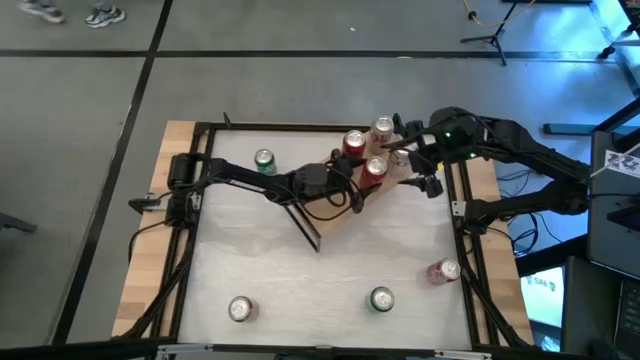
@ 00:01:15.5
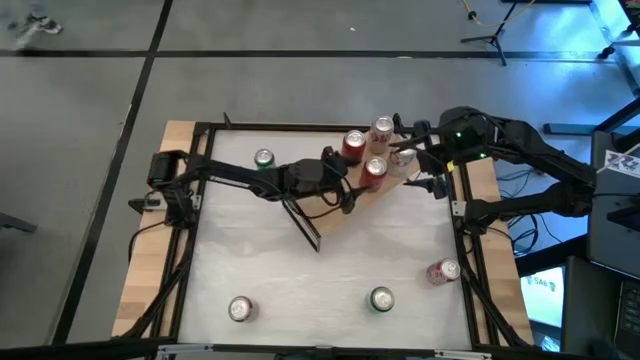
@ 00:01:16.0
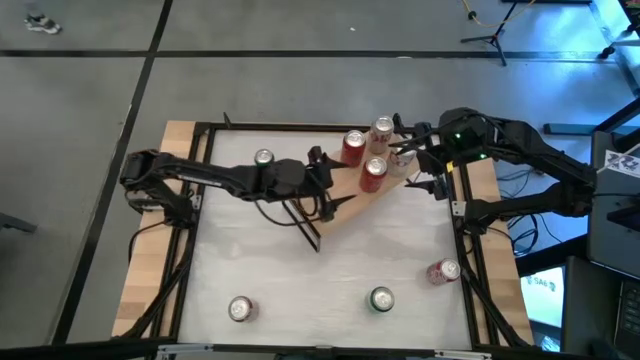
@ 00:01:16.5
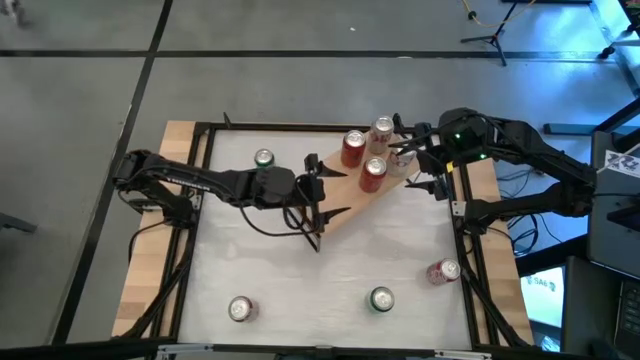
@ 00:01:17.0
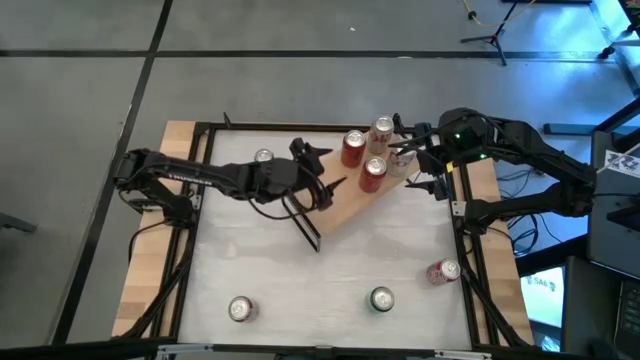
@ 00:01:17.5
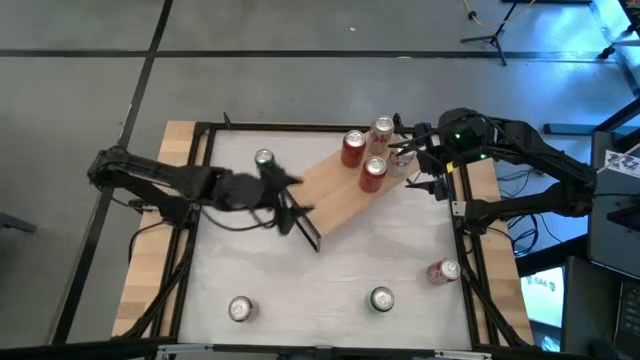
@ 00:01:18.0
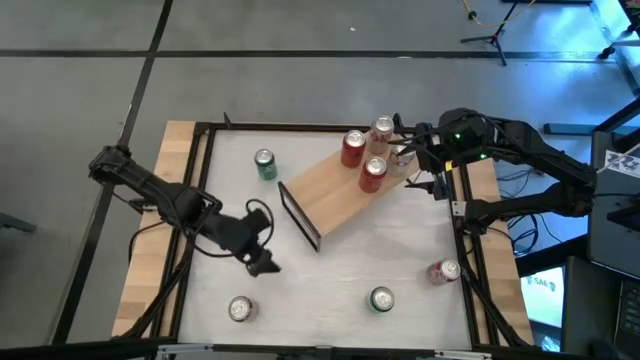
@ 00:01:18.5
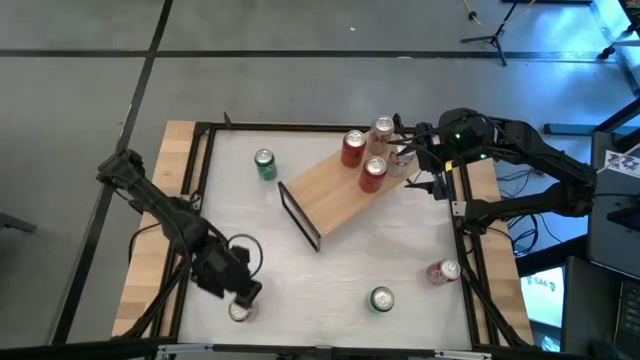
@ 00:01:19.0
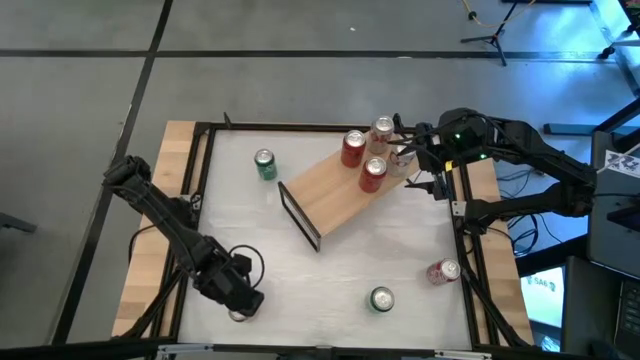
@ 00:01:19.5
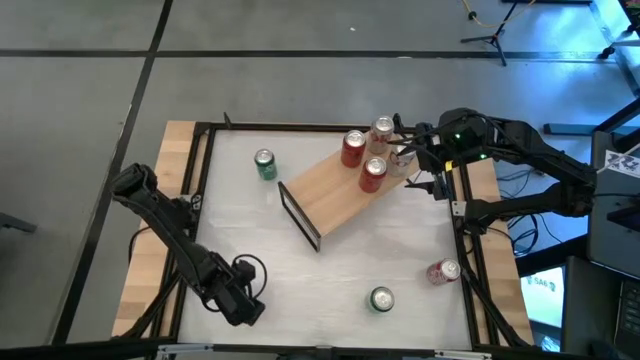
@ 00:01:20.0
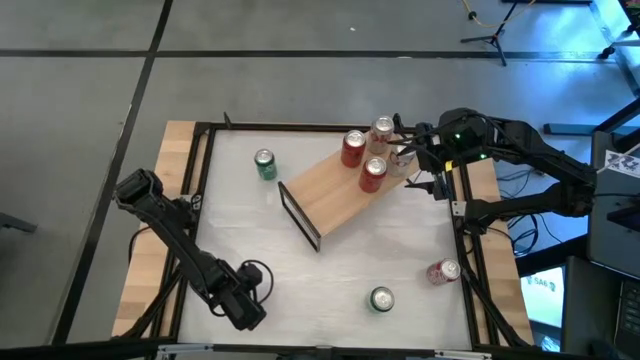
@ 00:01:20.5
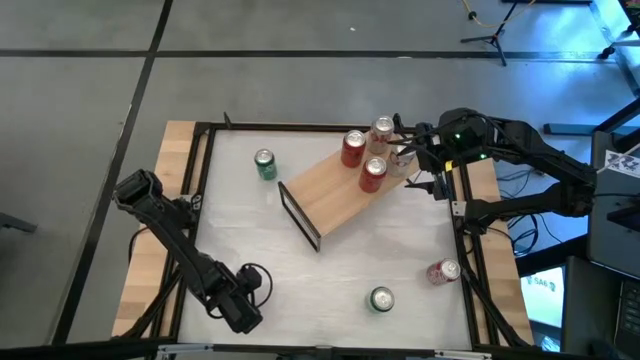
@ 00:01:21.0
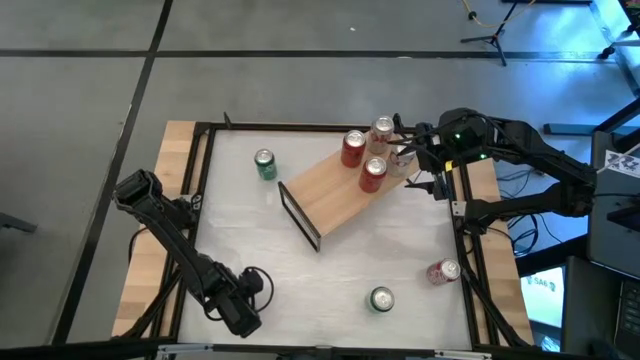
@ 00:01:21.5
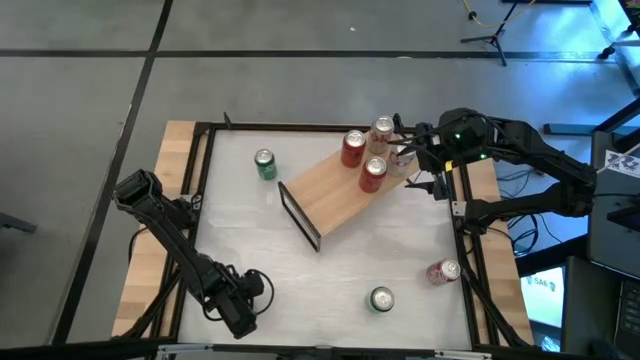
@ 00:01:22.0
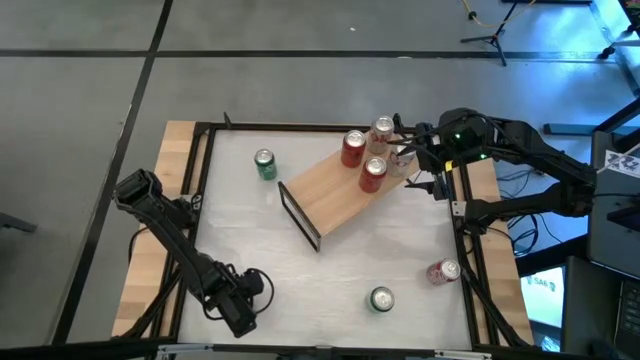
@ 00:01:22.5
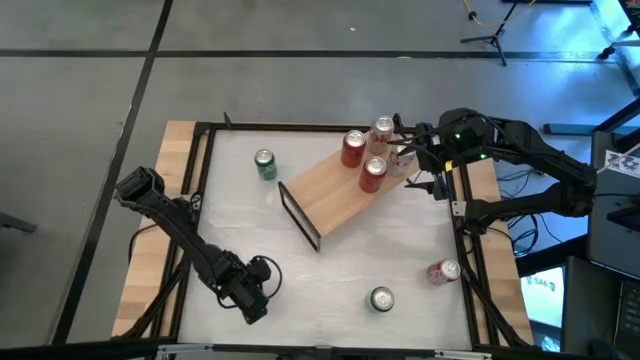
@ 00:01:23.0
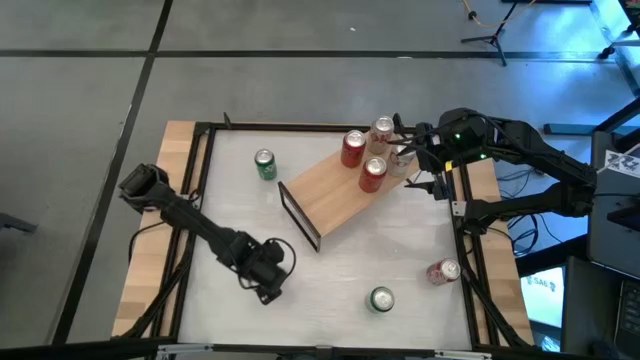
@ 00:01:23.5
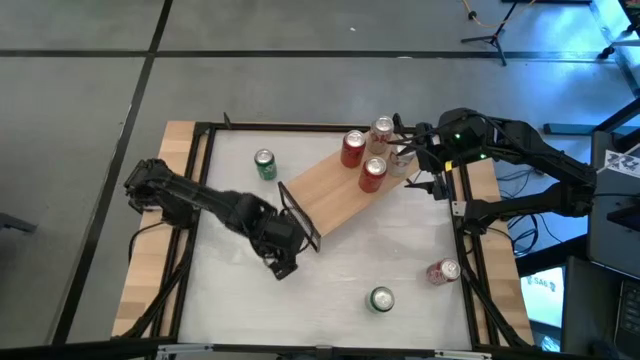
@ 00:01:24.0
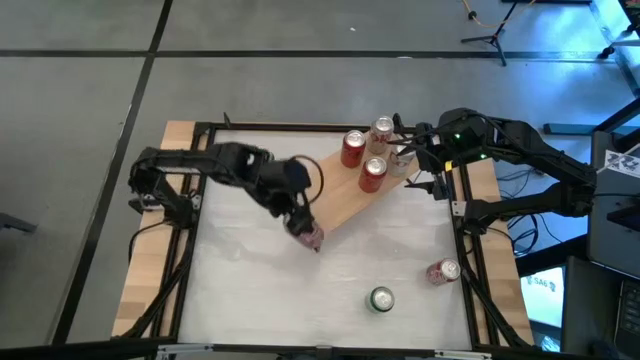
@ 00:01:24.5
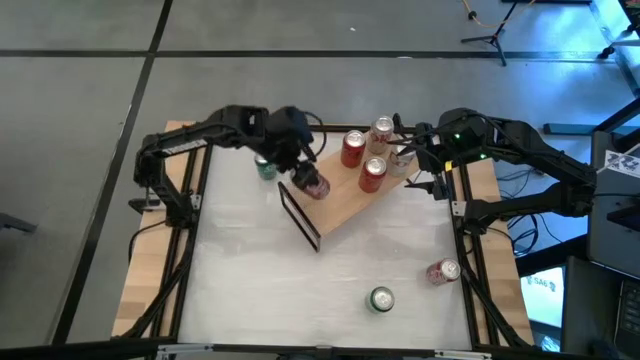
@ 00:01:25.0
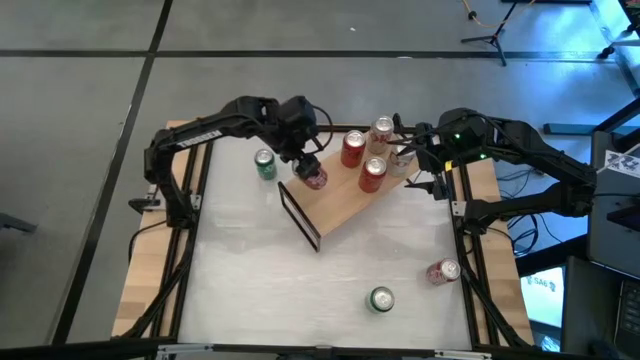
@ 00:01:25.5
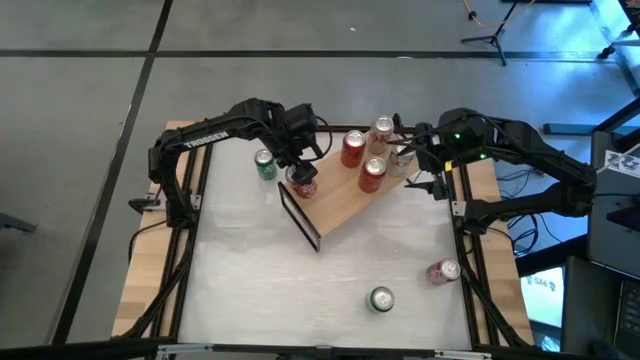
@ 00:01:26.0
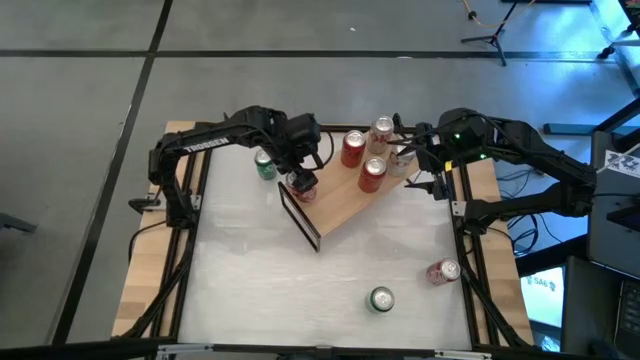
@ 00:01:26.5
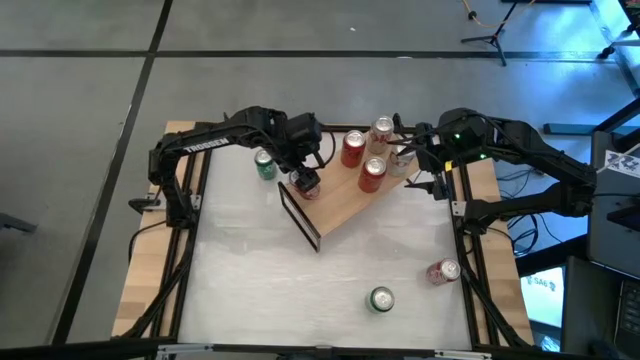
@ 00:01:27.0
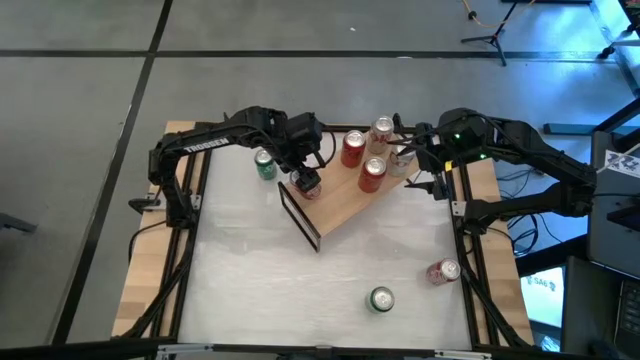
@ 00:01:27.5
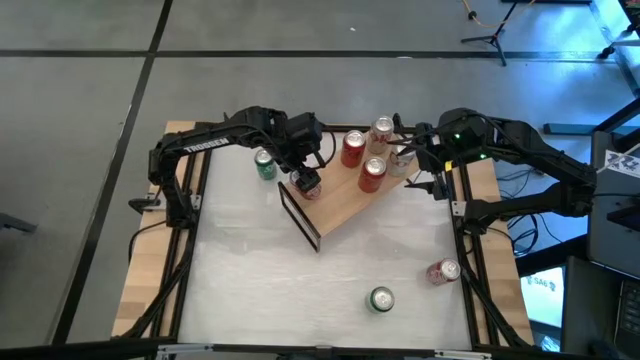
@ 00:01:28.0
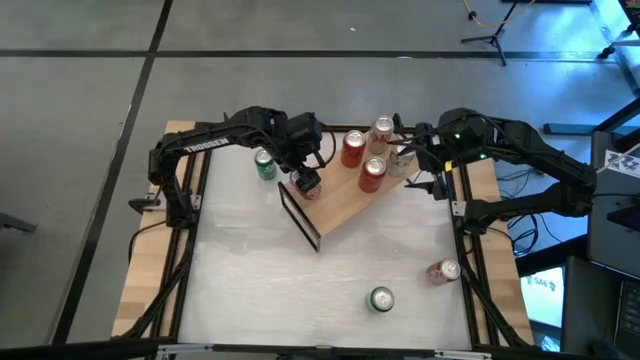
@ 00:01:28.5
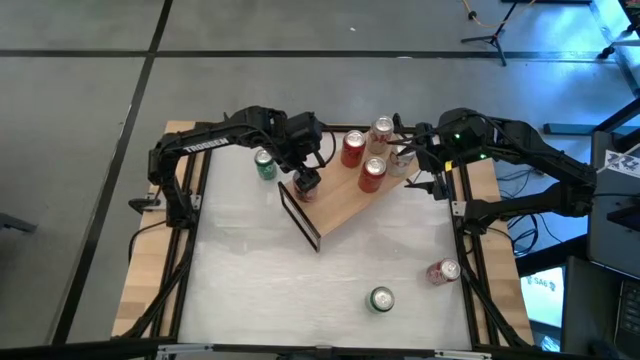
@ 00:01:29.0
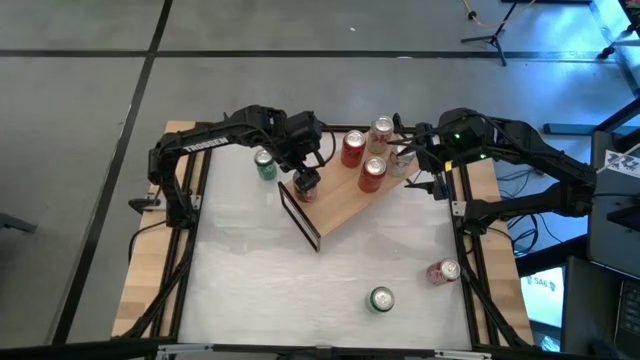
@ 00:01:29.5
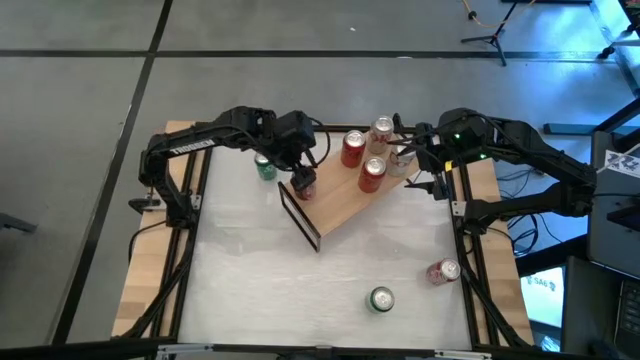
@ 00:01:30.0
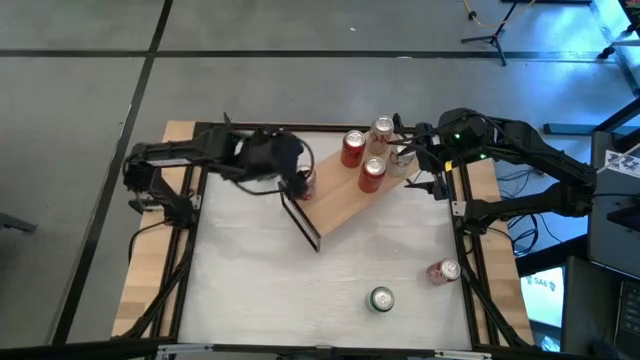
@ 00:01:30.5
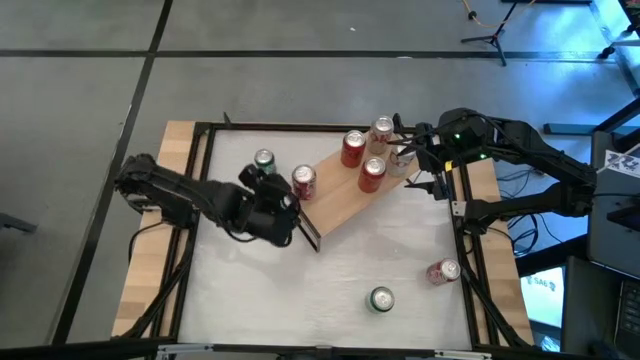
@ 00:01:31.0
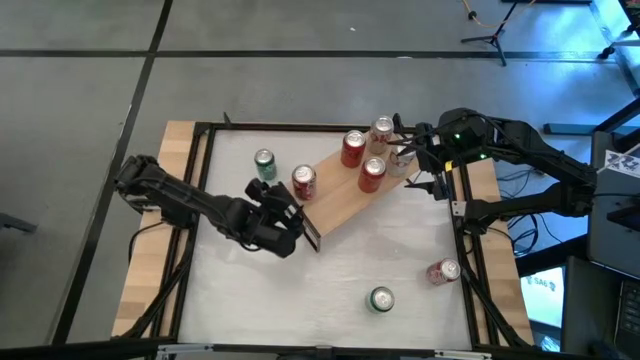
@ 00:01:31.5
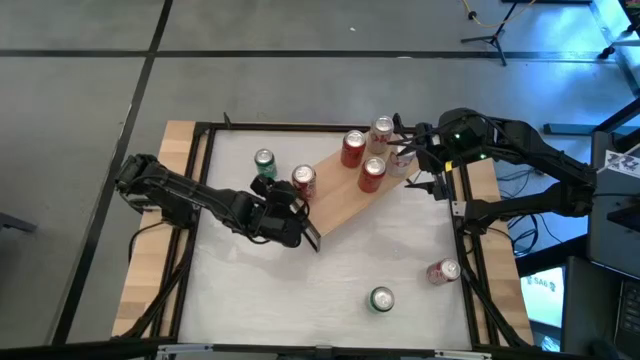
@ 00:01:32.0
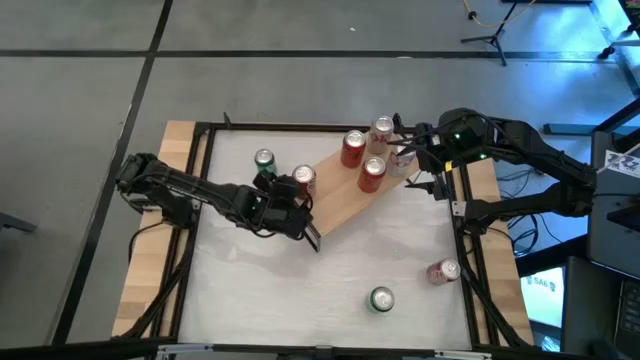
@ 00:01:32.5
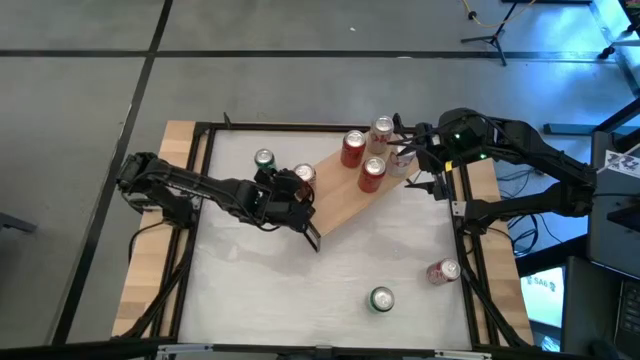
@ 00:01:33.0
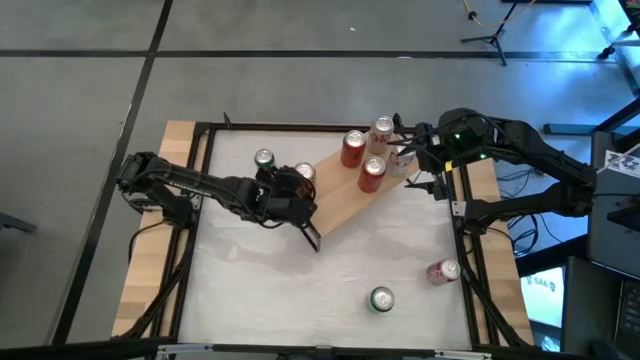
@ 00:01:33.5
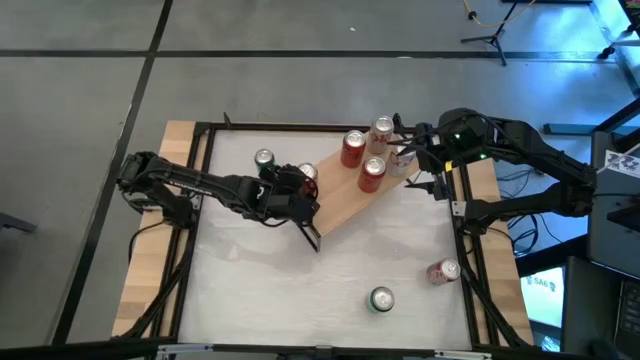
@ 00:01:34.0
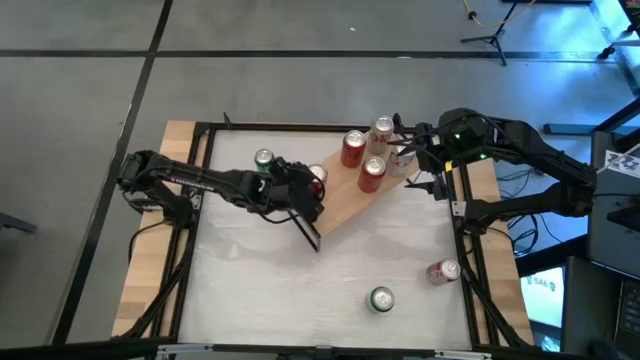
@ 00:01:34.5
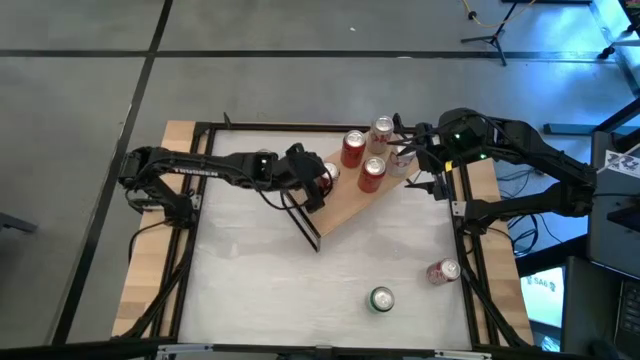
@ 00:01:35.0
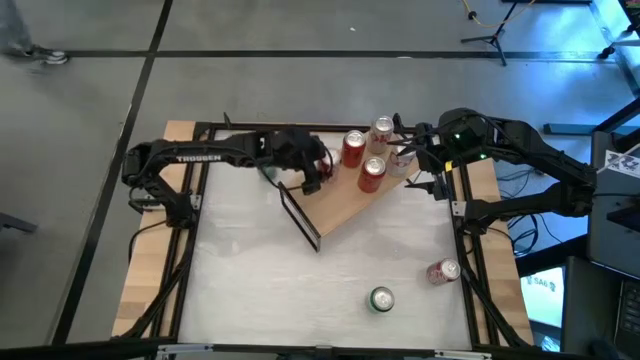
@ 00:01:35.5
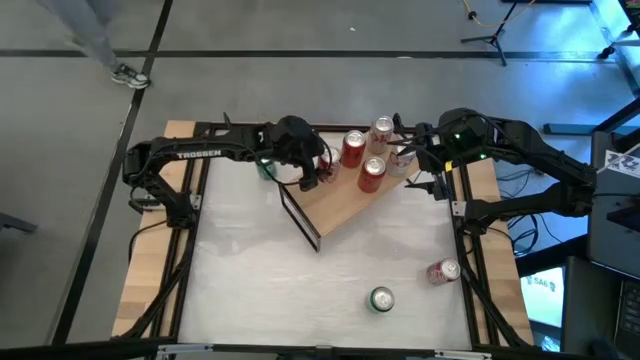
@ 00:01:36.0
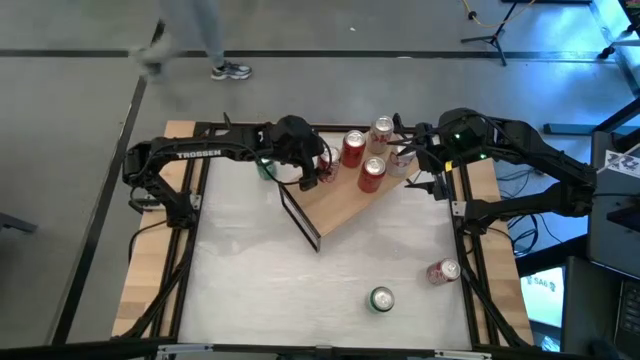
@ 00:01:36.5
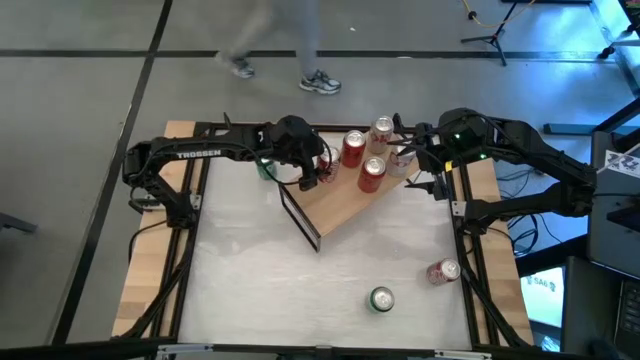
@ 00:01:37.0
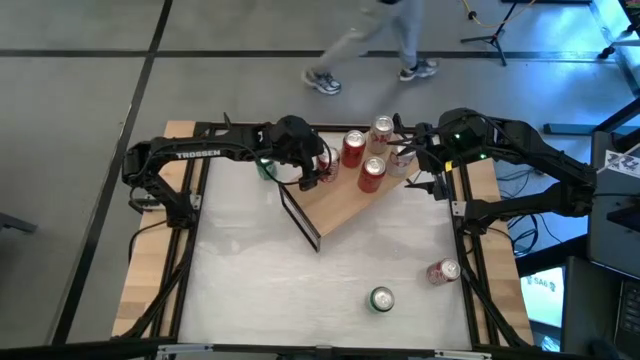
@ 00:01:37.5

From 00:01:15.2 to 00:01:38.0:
Task: Place canned beverage on shelf
Put the left red and white soda can on the shelf
